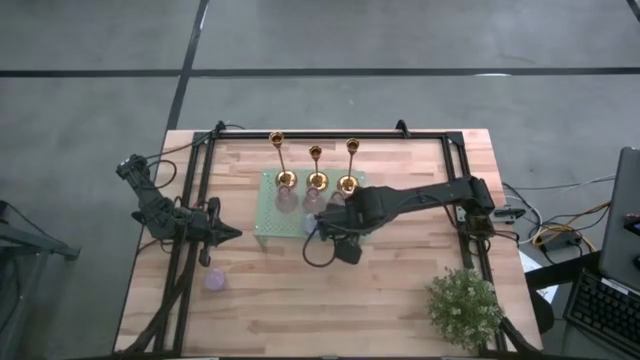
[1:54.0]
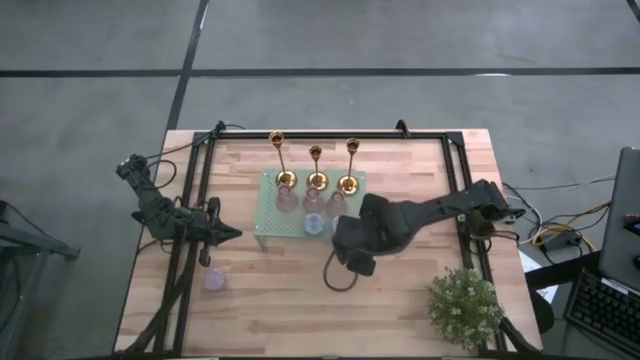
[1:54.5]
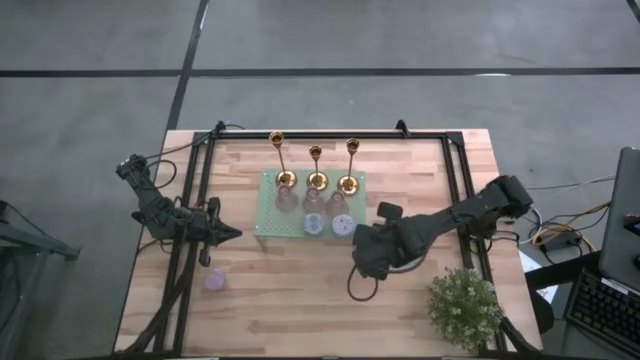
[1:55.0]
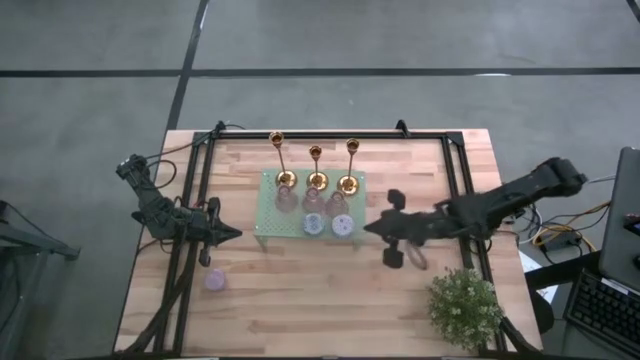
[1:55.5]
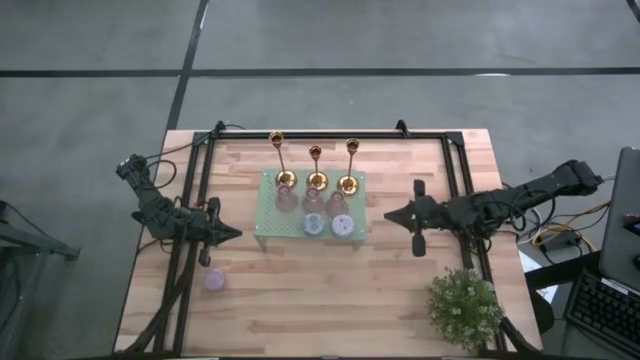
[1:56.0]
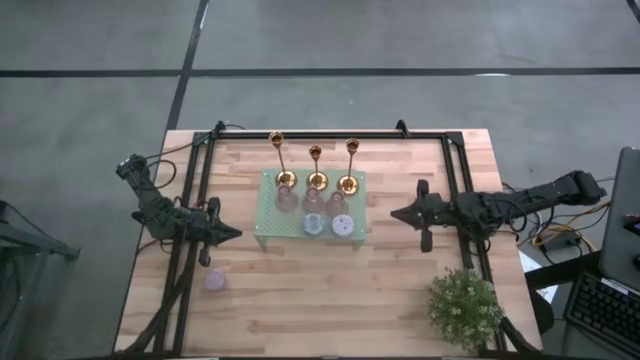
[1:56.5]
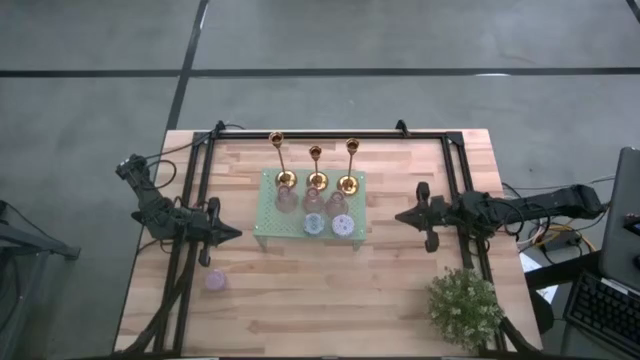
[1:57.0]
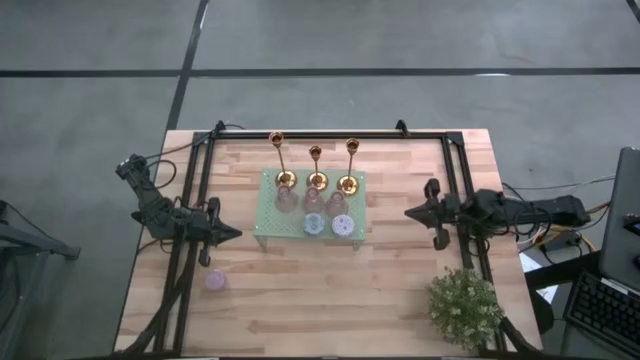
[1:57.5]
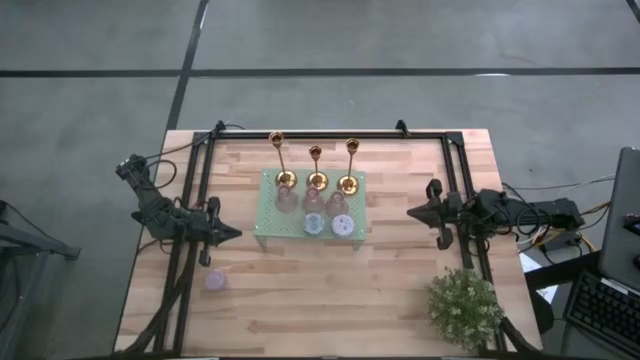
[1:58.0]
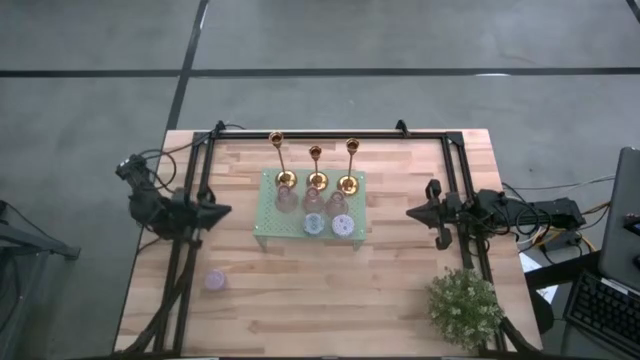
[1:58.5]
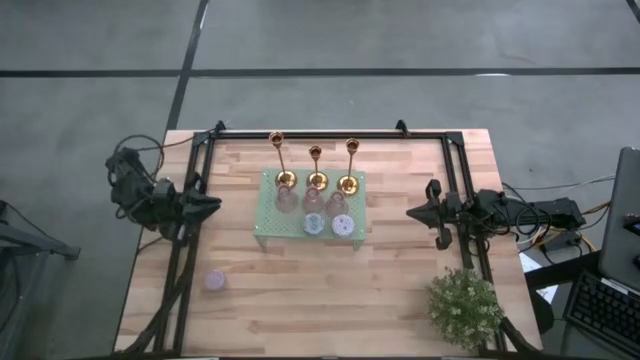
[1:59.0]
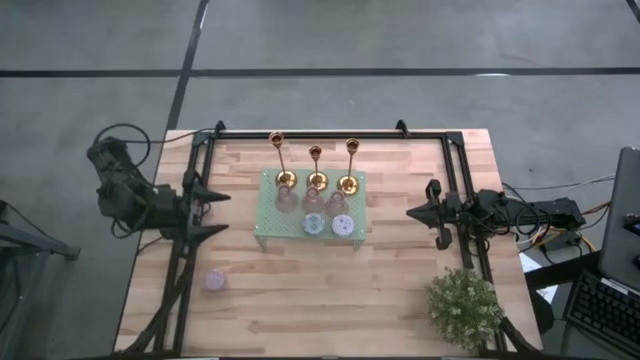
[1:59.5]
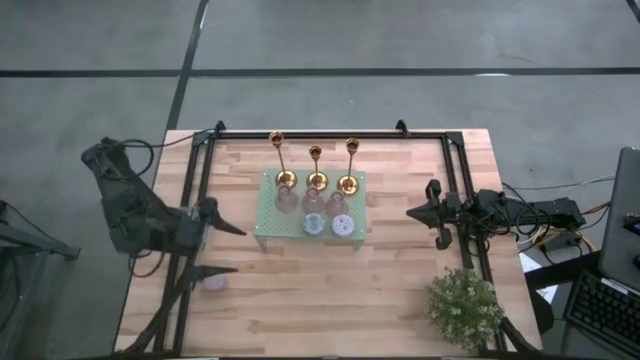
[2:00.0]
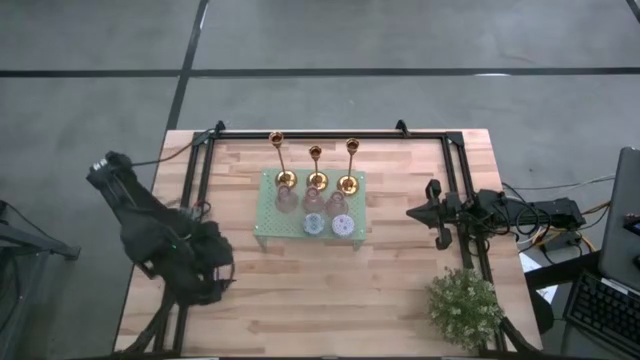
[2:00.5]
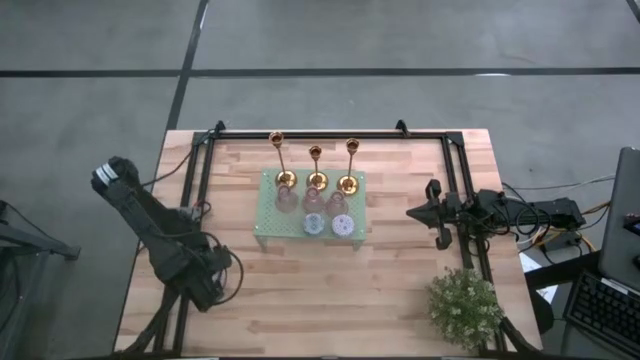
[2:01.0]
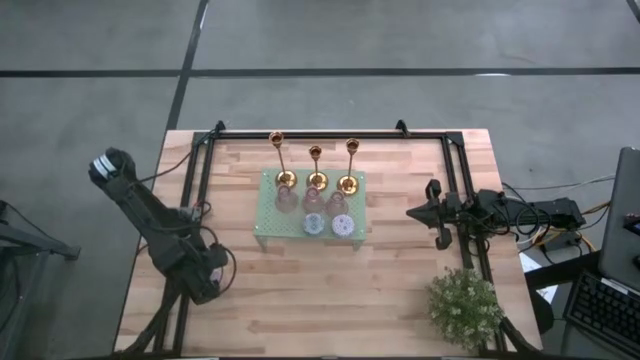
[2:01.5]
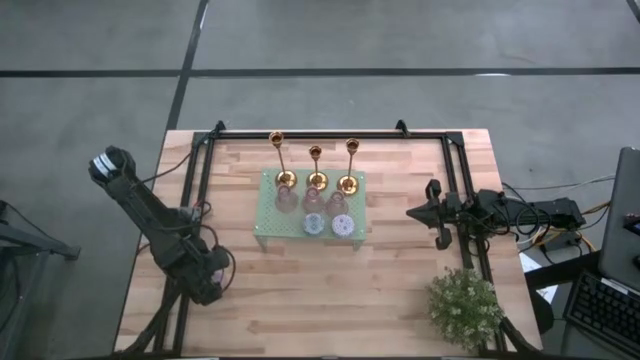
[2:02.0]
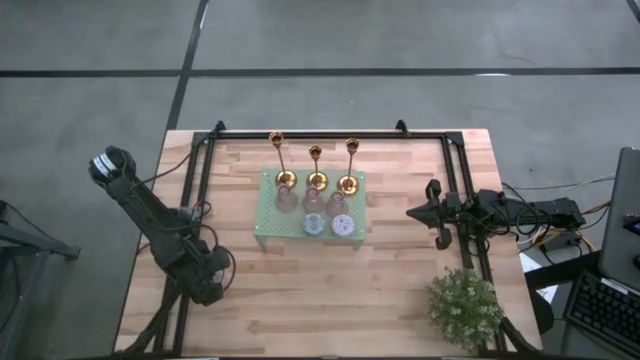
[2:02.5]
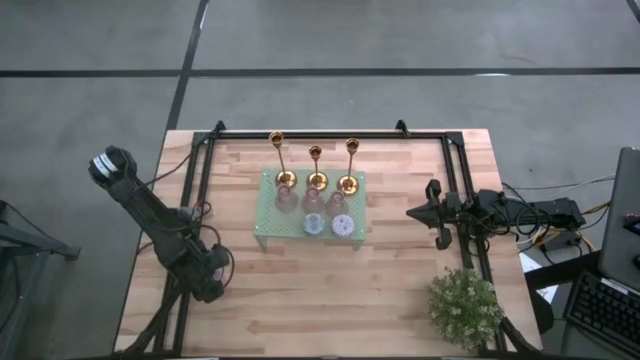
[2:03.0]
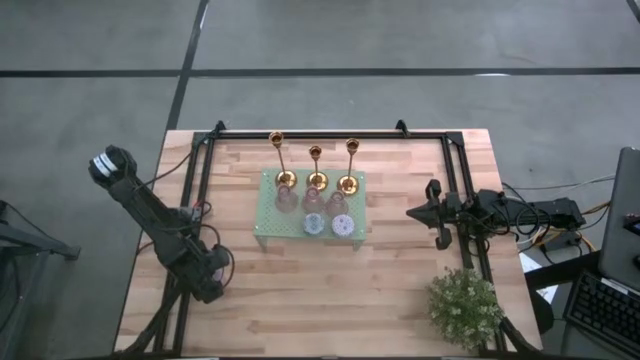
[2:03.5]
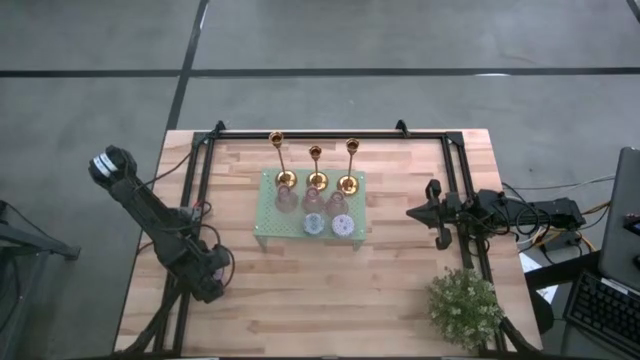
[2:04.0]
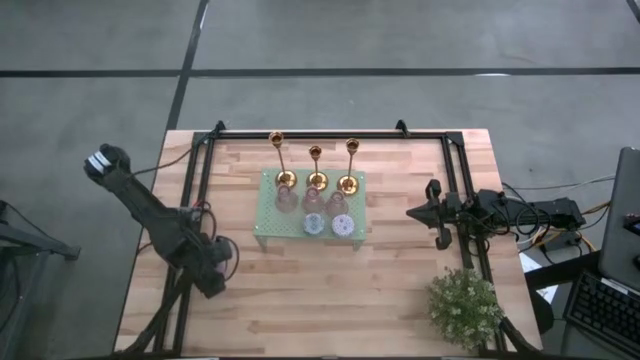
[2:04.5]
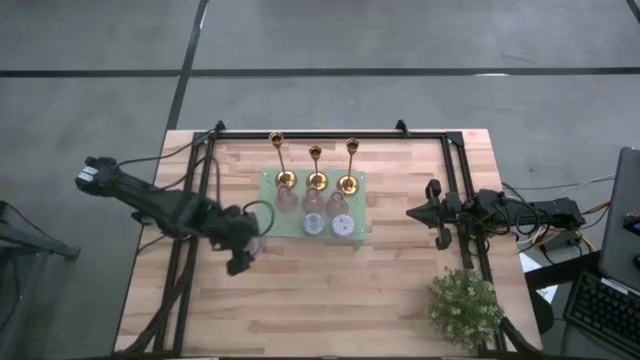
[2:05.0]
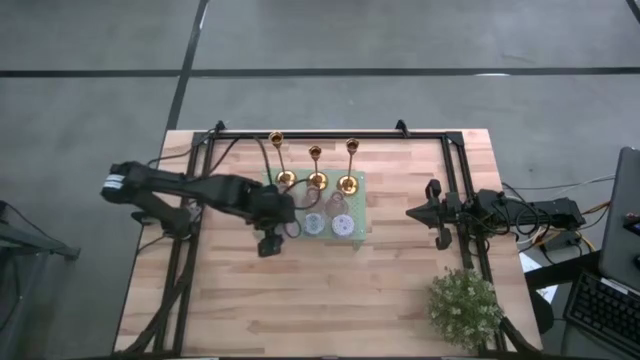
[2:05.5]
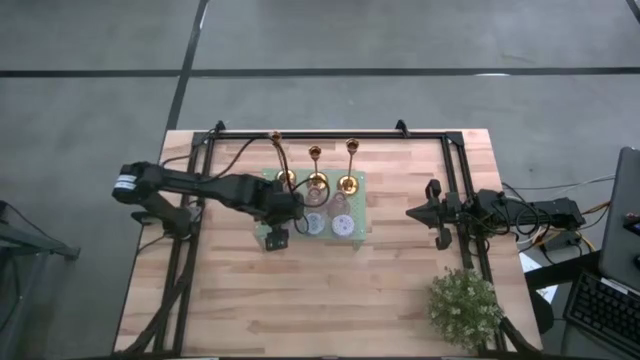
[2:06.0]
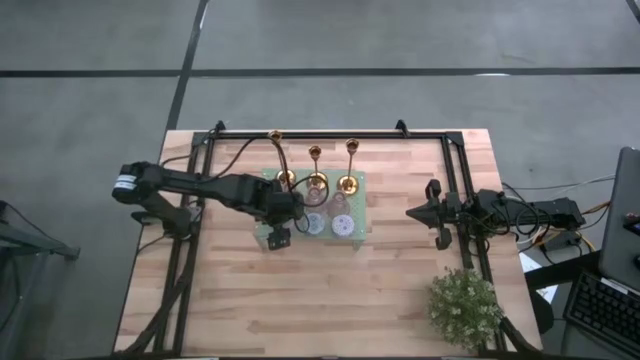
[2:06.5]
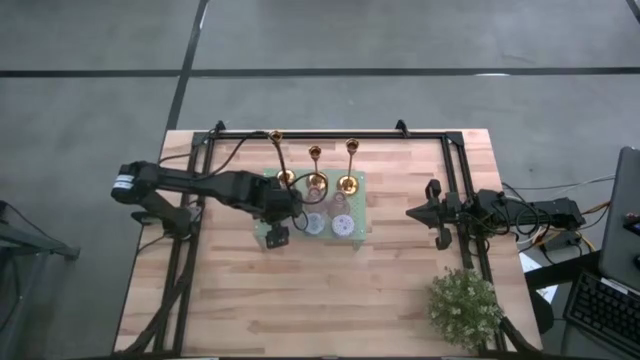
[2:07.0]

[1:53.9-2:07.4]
Task: Pick & Place candle stick holders
Put the pink scented candle on the shelf aligned with the other scented candles

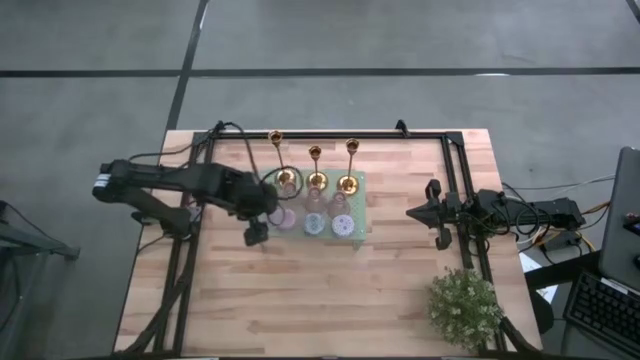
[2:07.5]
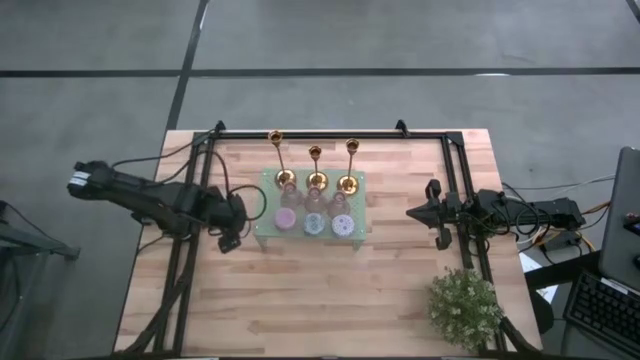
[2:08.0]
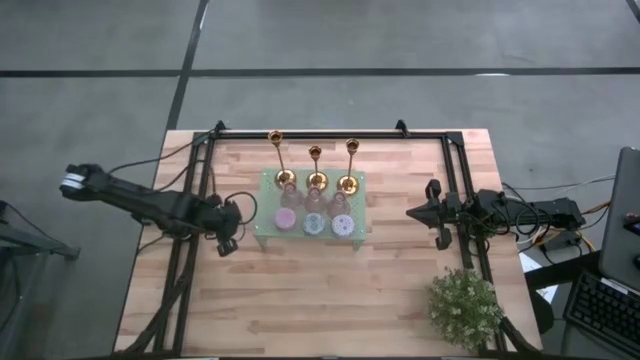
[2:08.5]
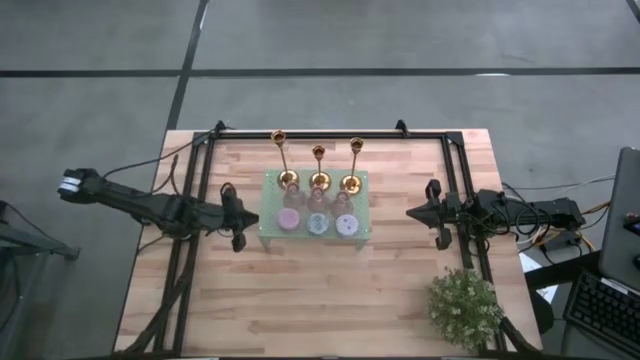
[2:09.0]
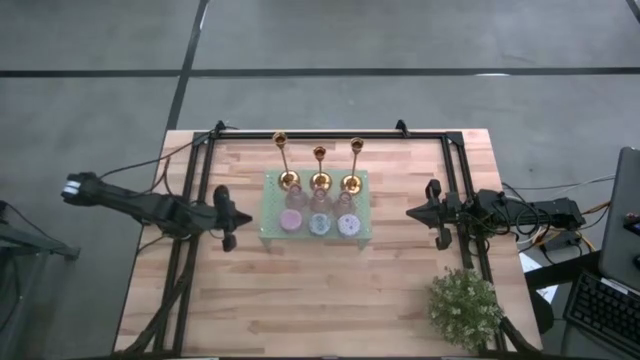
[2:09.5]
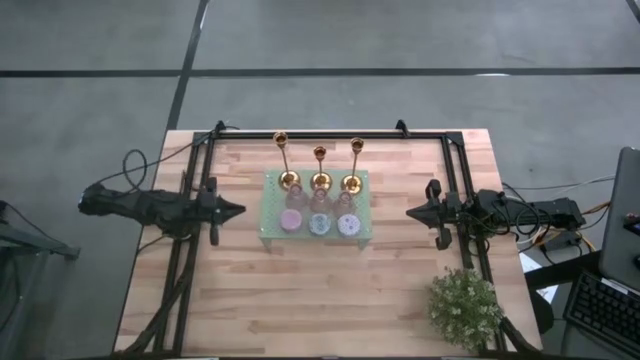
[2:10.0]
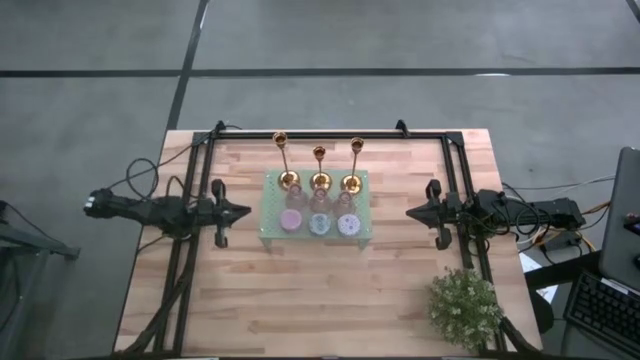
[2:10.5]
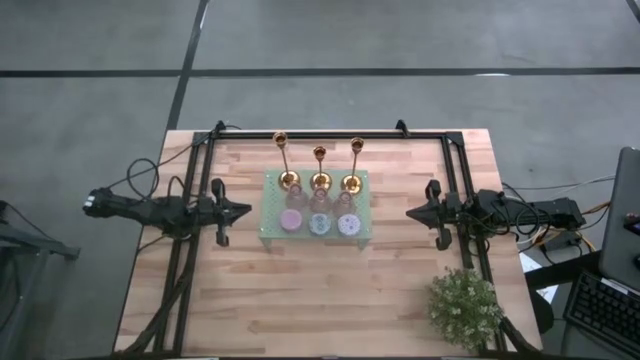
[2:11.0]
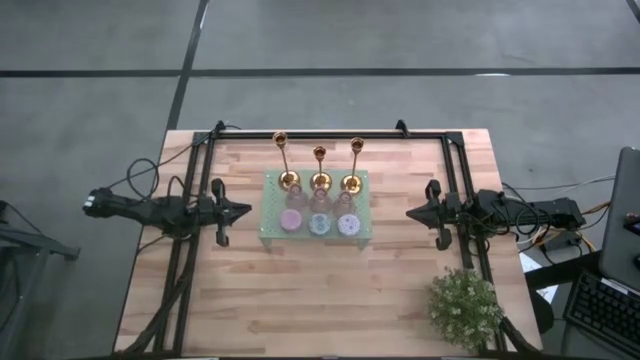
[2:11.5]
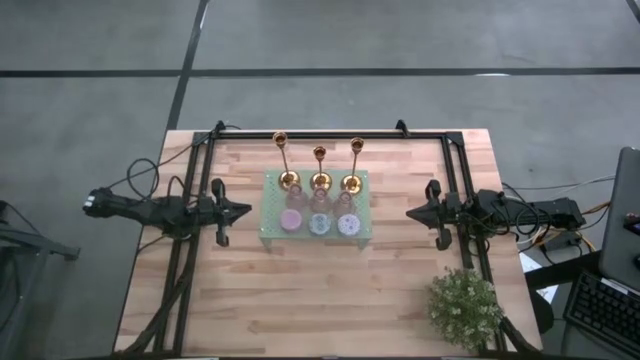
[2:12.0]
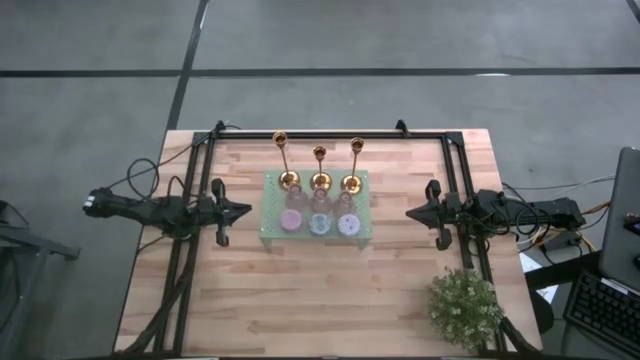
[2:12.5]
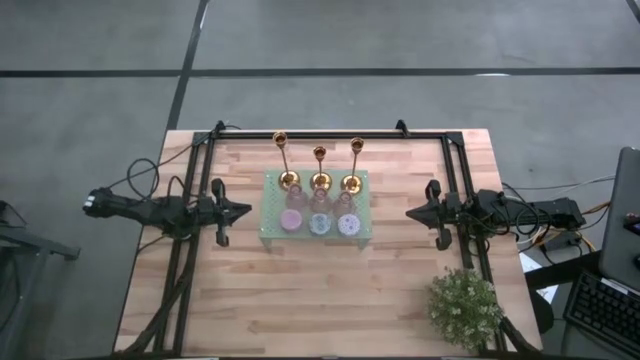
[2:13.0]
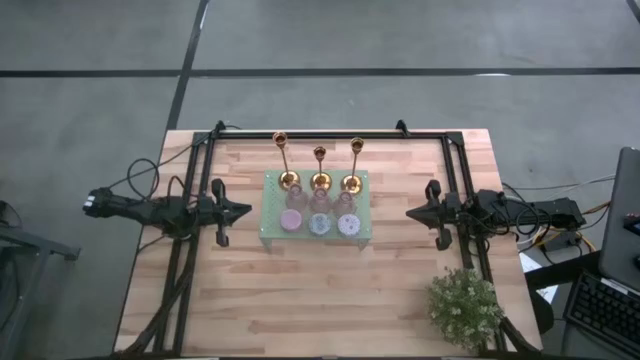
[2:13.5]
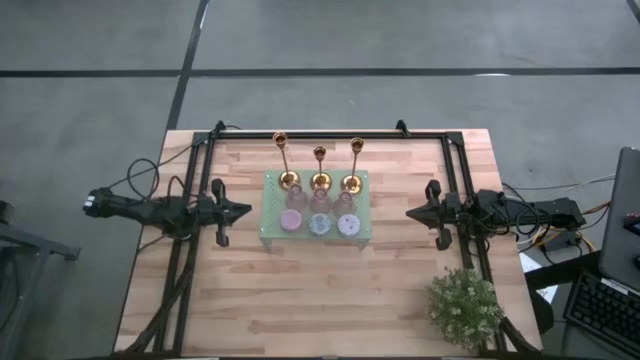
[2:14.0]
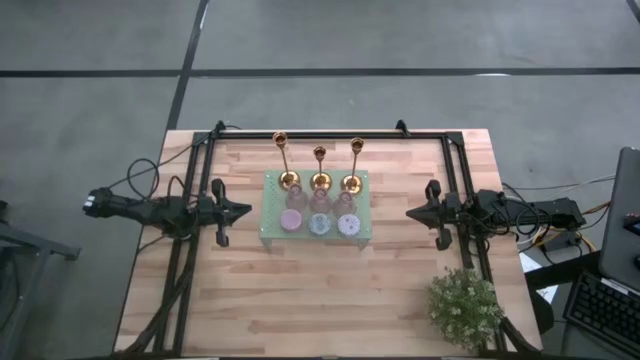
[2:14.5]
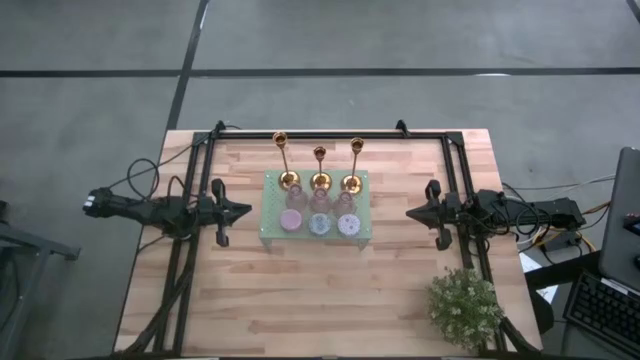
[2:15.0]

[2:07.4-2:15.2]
Return to Home Position
